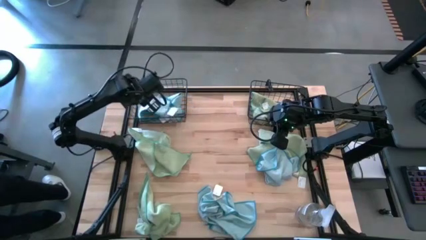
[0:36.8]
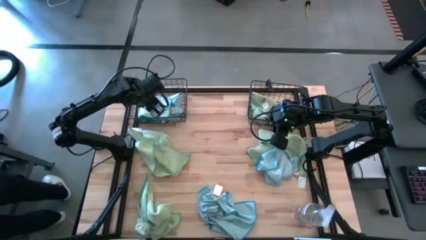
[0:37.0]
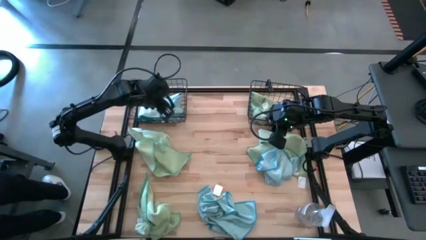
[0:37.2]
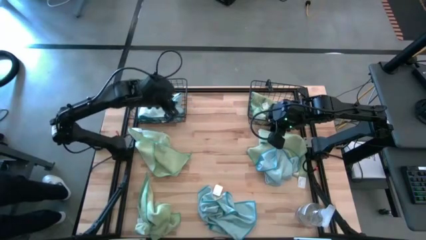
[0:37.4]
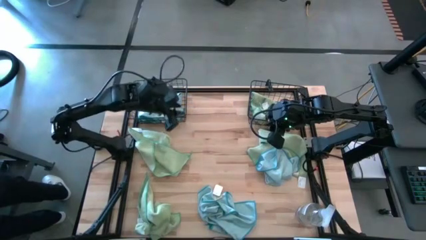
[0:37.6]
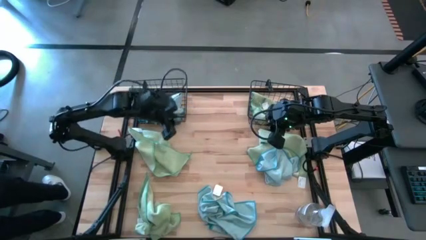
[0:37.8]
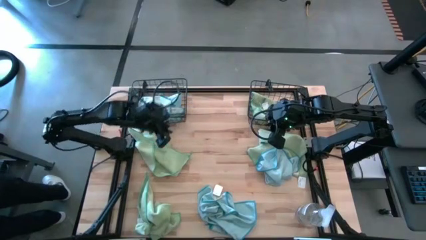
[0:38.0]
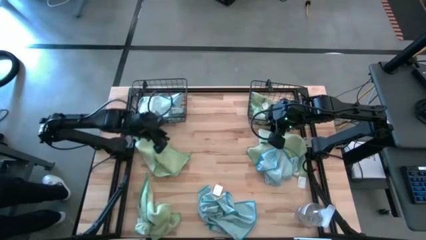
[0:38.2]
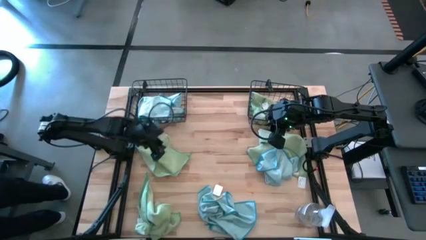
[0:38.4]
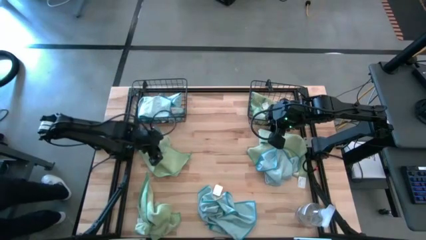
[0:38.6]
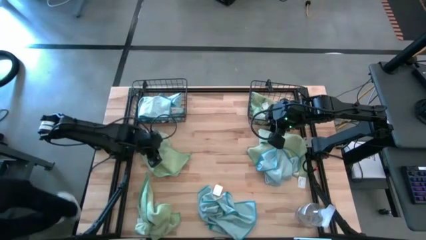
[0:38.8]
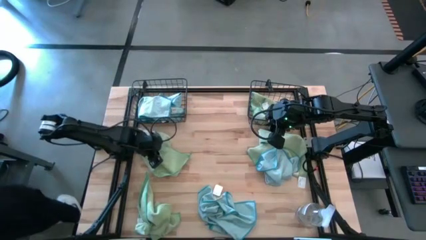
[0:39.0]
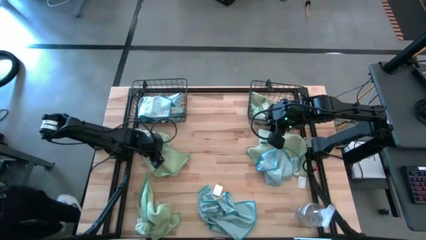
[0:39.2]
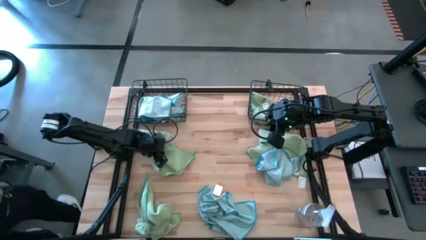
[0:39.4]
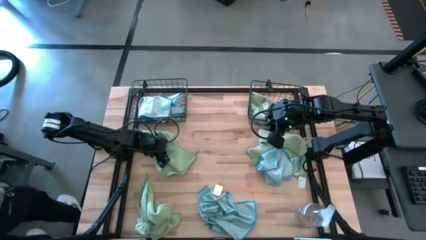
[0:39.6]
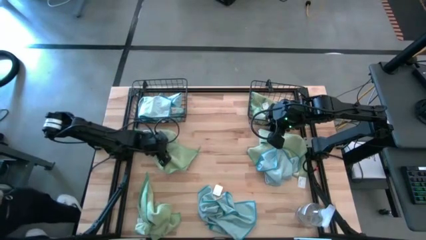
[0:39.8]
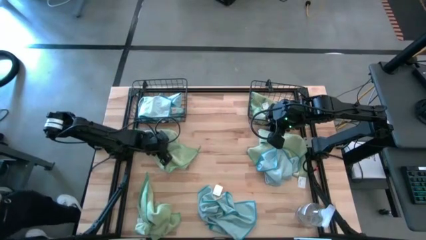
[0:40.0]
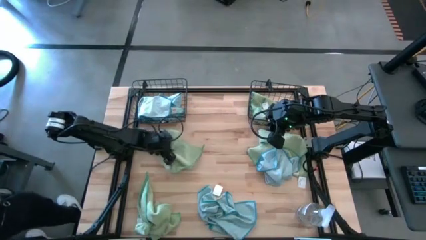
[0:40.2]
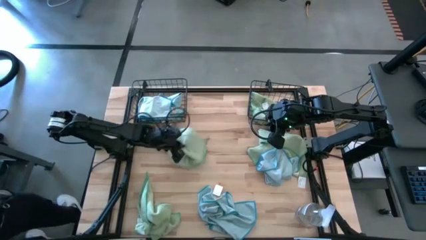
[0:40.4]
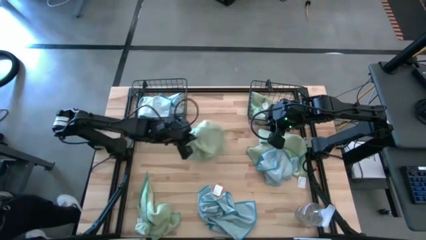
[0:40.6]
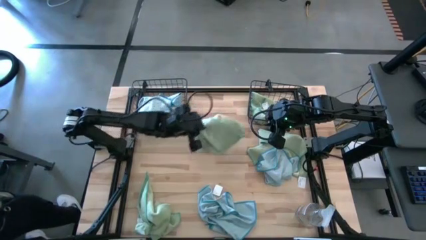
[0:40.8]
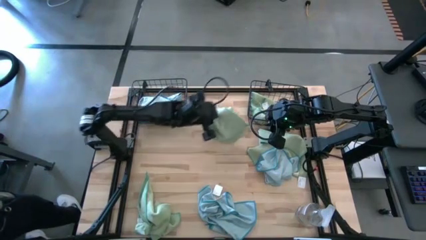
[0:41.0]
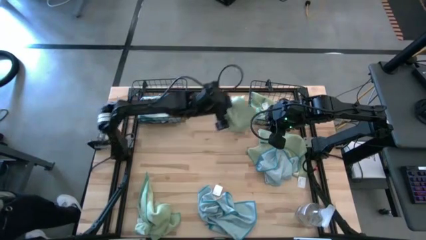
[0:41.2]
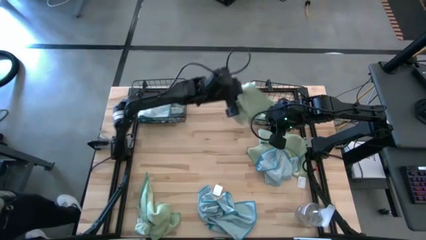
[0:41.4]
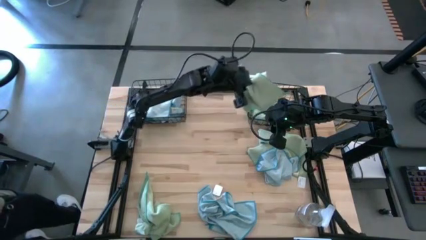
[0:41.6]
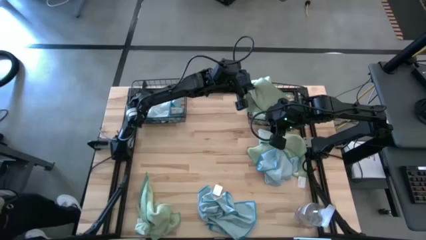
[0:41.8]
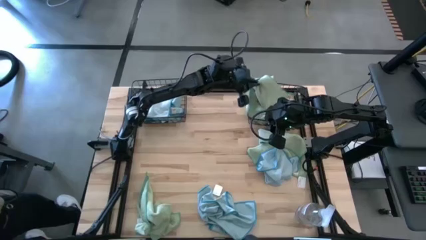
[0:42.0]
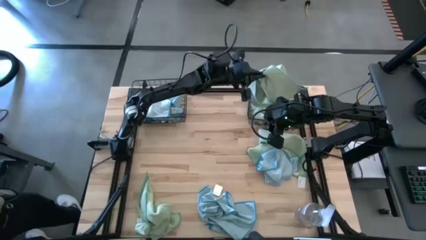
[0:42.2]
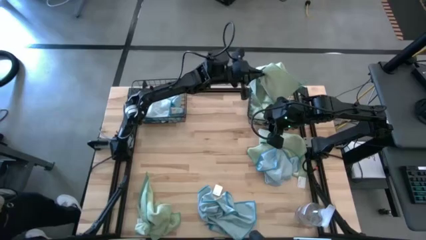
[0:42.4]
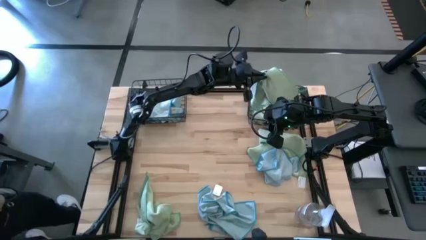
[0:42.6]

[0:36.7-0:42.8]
Task: Sort microfiber towel by color & place in baskets
Put the green microfiber towel into the right wire basket

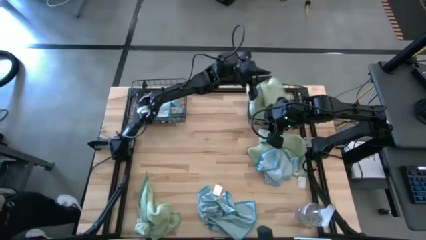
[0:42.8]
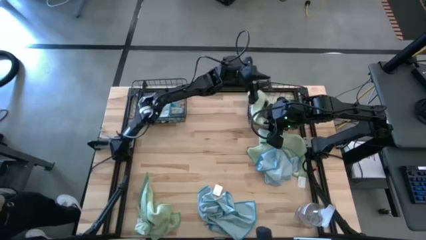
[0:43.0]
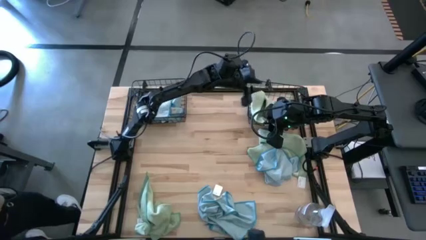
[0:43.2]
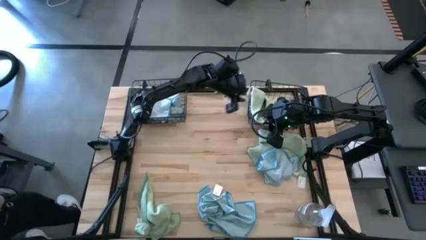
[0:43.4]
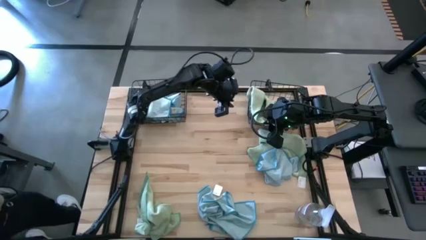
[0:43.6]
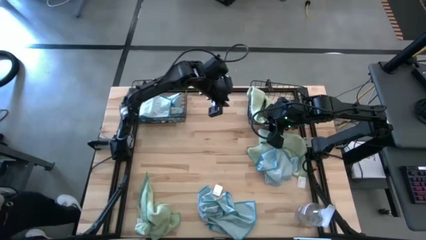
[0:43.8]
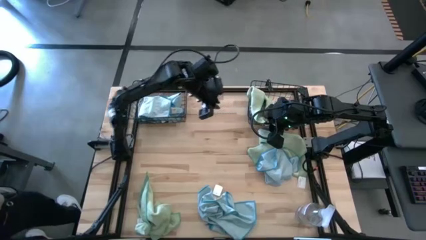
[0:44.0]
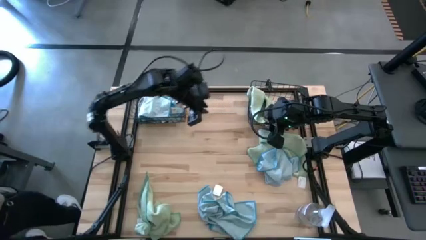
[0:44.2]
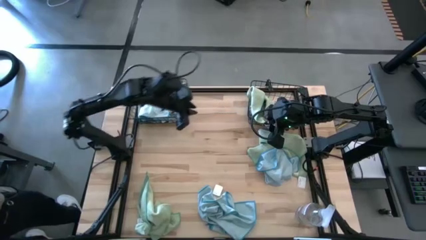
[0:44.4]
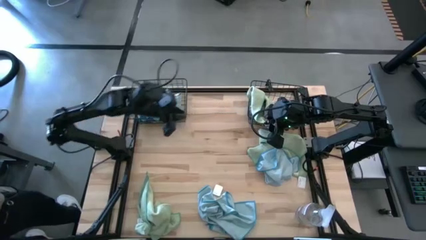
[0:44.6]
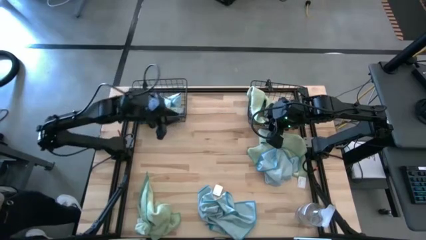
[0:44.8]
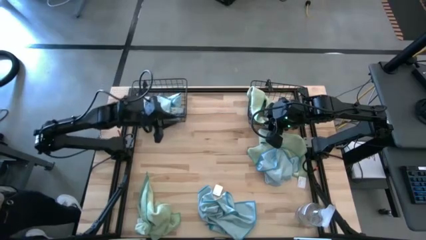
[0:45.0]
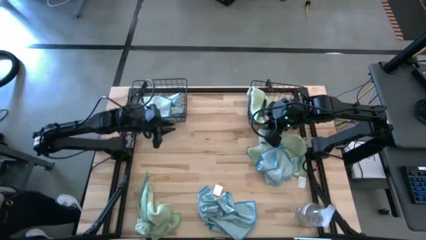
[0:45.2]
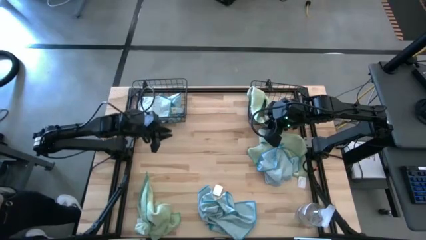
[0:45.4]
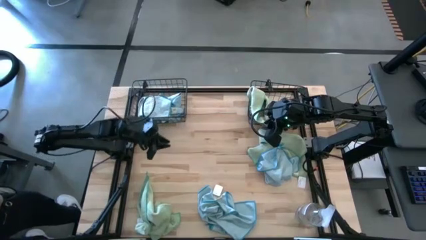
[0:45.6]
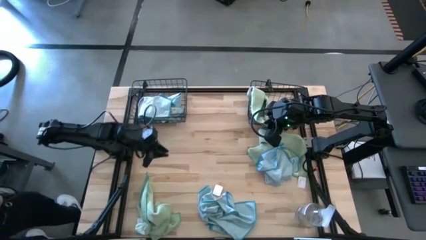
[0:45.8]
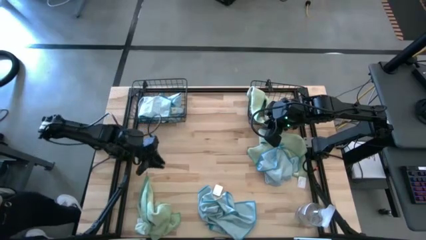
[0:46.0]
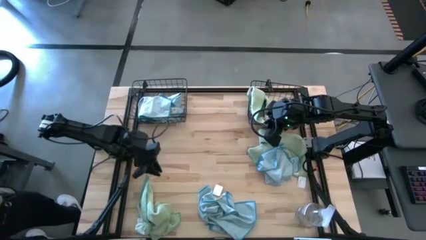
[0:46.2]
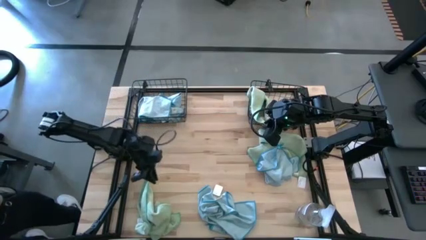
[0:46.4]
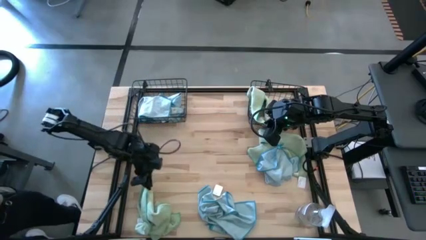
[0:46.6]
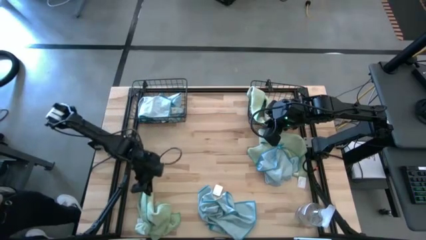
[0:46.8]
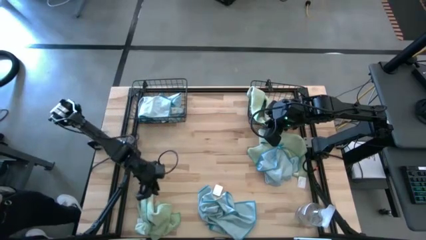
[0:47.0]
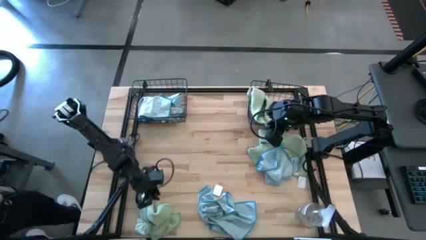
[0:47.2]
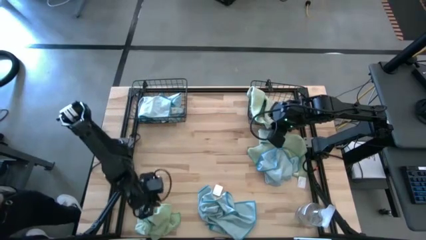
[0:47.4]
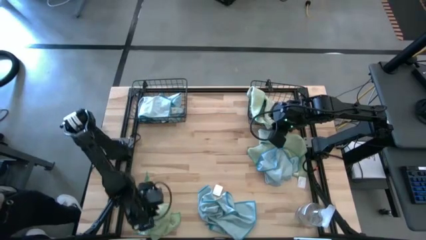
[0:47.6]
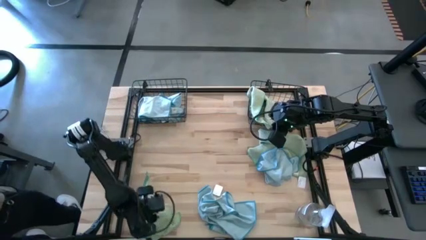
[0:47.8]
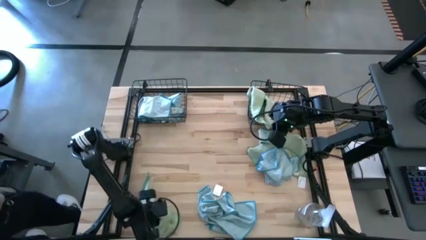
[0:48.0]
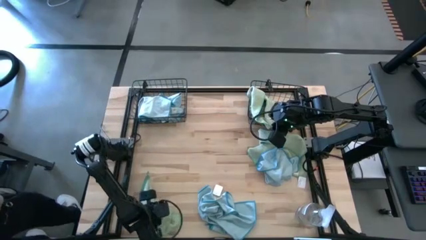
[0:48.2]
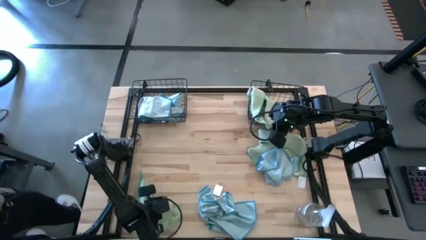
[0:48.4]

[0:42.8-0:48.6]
Put the green microfiber towel into the right wire basket

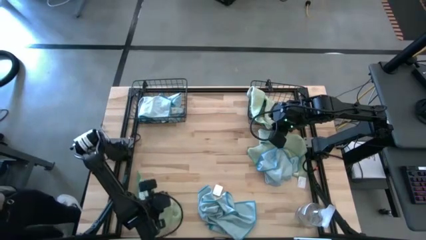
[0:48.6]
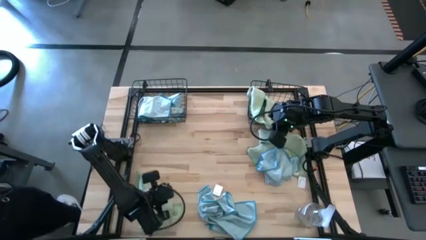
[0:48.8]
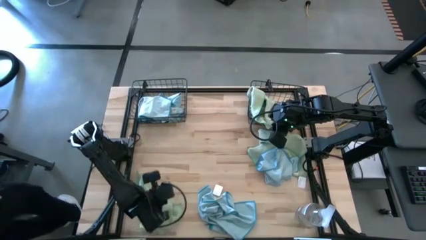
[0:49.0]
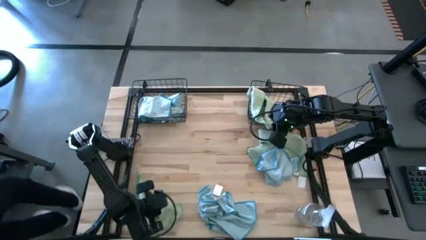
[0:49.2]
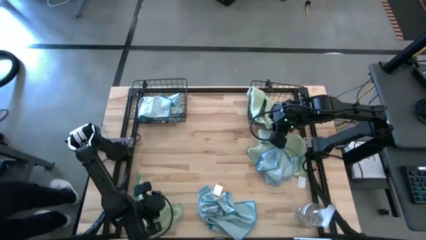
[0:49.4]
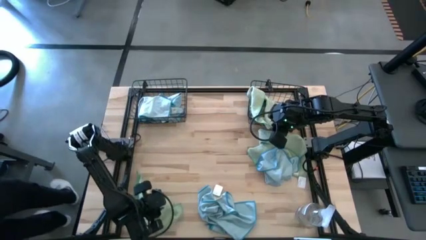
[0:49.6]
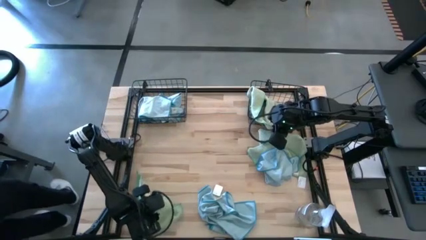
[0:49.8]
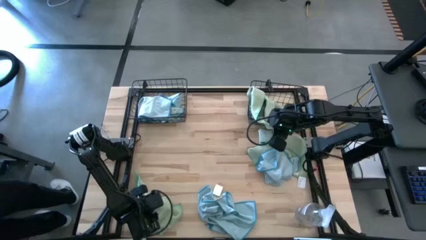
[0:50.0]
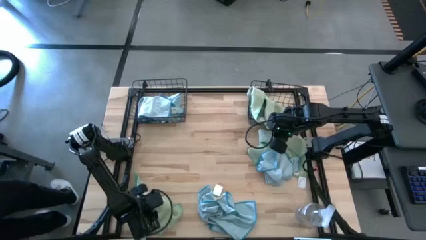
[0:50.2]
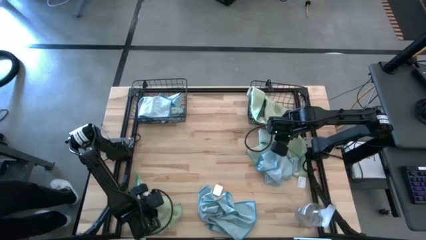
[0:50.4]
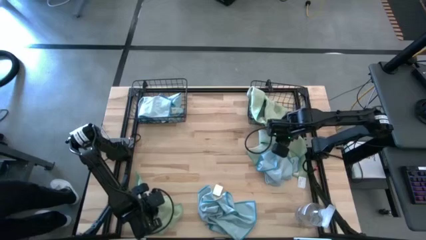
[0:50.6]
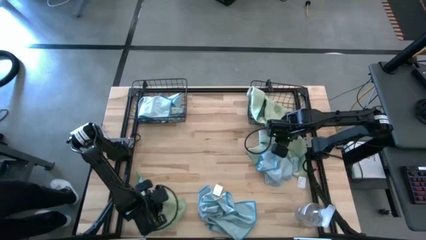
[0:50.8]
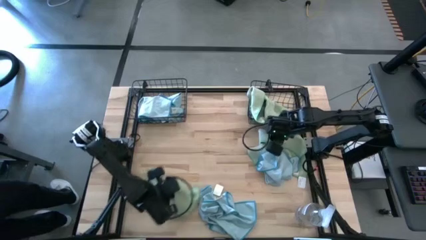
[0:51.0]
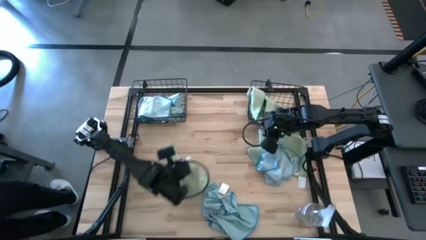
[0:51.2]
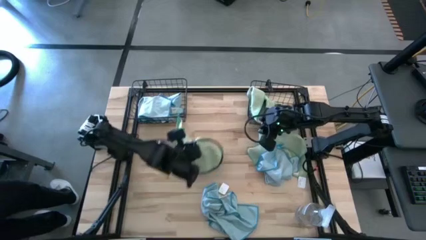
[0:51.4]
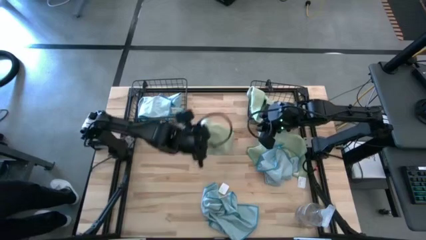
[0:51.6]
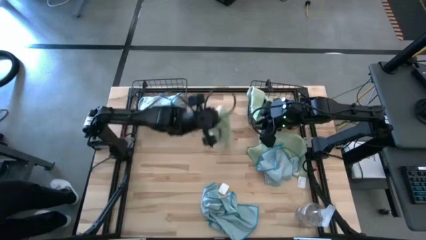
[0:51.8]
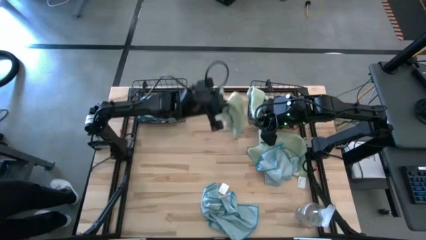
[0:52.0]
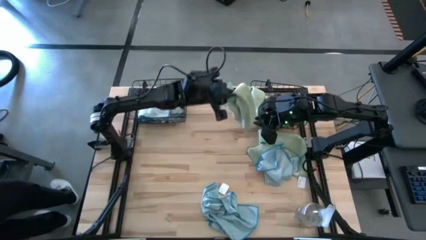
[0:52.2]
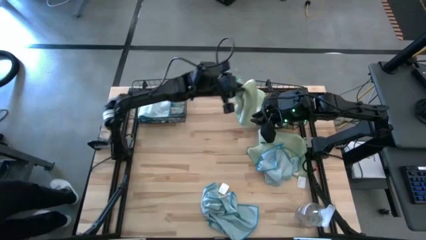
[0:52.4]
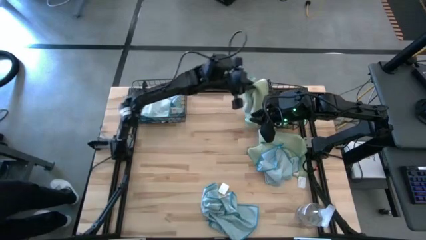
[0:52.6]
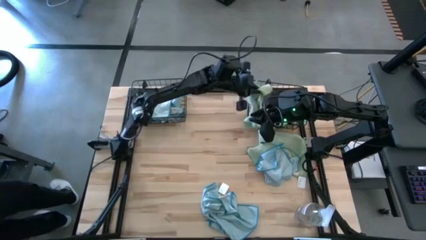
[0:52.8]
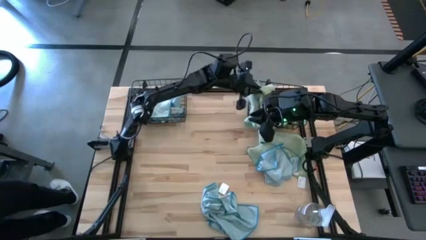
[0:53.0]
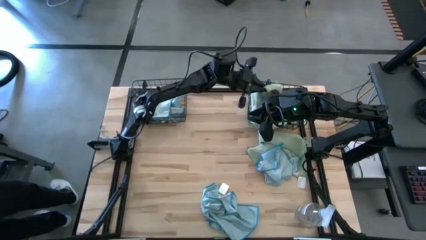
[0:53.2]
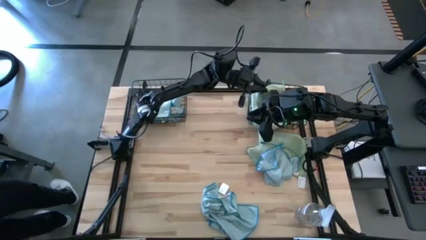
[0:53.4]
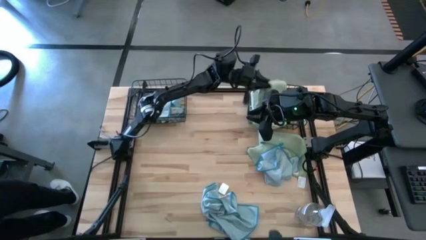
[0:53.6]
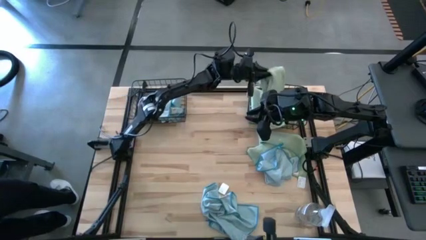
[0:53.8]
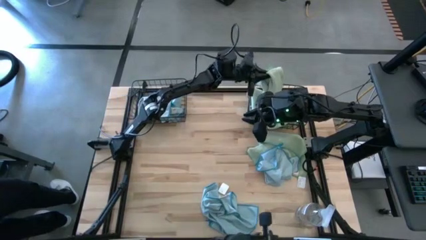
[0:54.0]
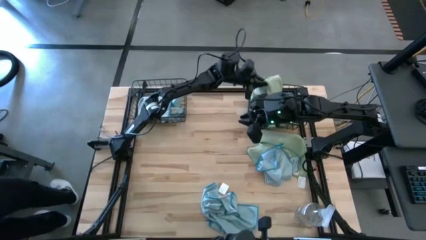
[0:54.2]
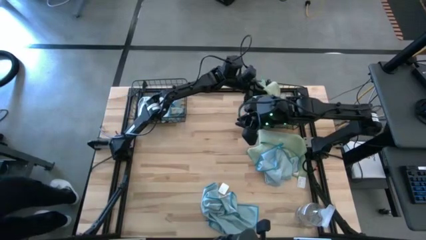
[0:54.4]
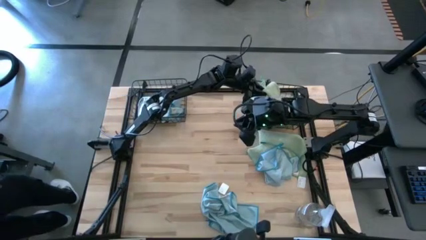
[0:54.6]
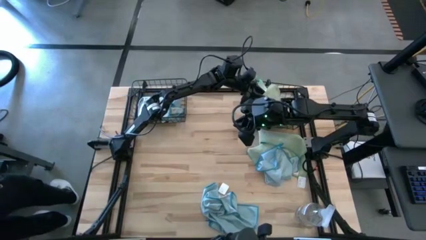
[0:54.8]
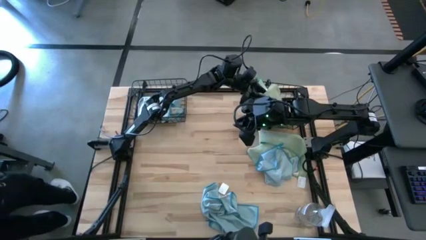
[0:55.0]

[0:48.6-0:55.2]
Put the green microfiber towel into the right wire basket
